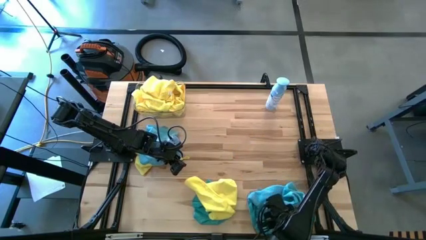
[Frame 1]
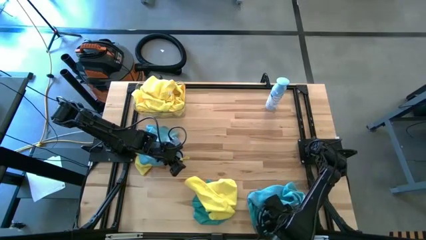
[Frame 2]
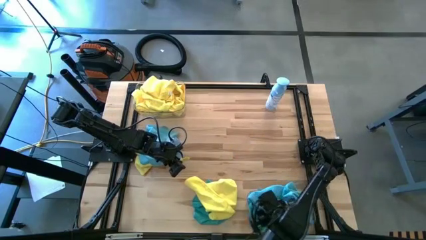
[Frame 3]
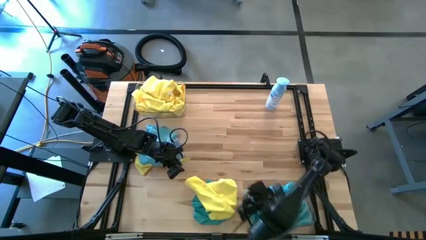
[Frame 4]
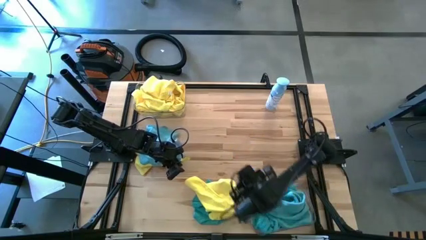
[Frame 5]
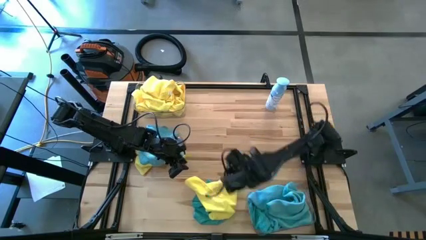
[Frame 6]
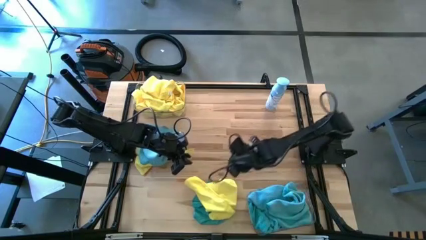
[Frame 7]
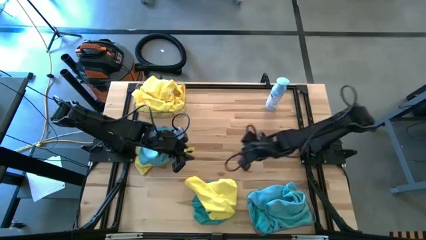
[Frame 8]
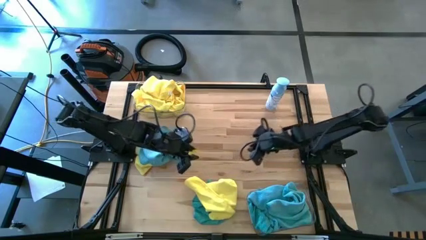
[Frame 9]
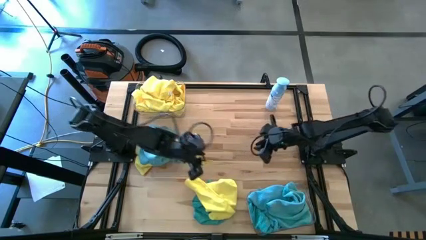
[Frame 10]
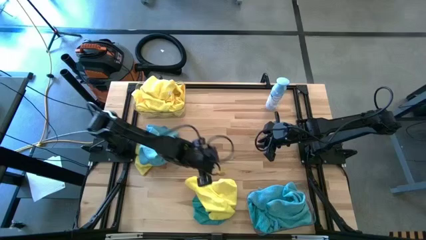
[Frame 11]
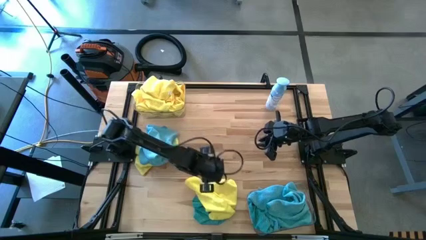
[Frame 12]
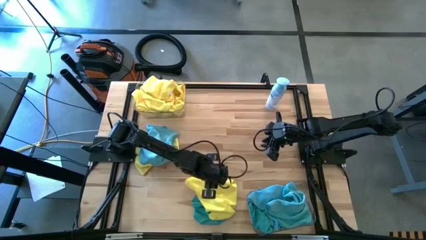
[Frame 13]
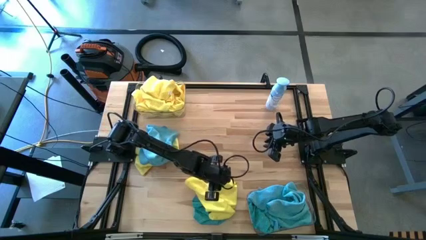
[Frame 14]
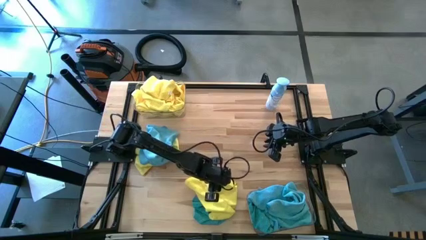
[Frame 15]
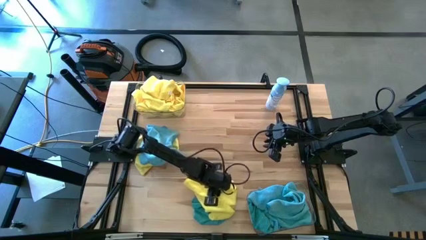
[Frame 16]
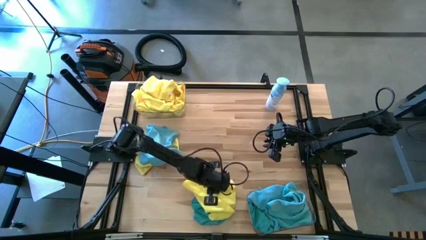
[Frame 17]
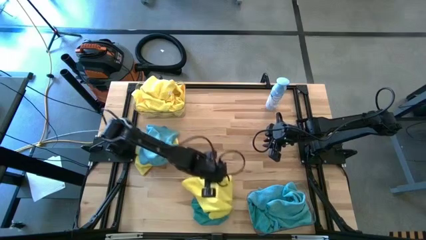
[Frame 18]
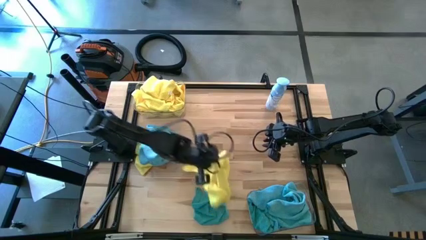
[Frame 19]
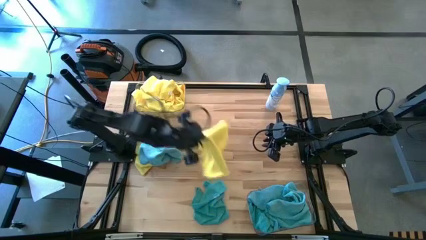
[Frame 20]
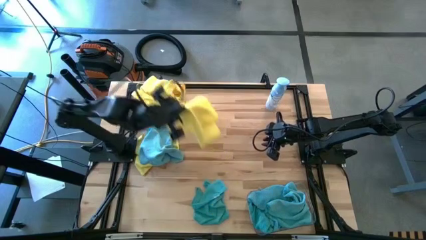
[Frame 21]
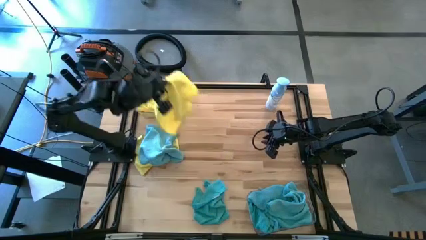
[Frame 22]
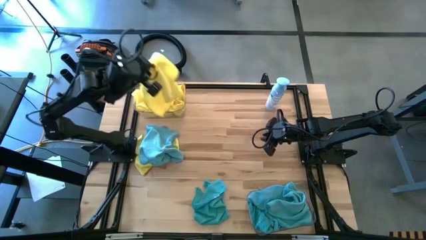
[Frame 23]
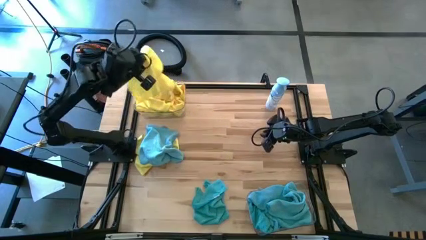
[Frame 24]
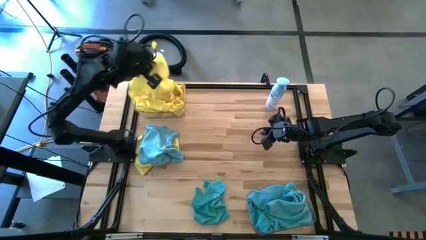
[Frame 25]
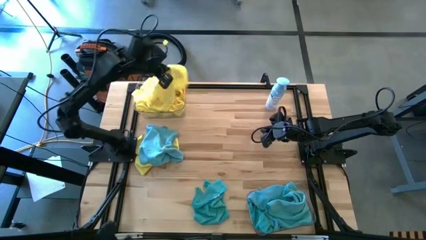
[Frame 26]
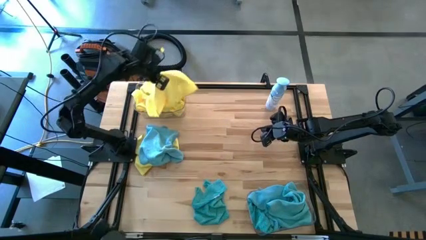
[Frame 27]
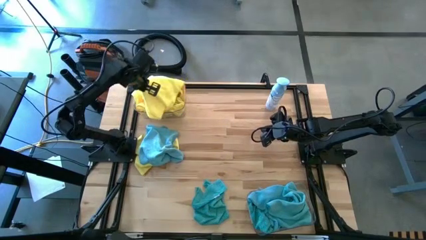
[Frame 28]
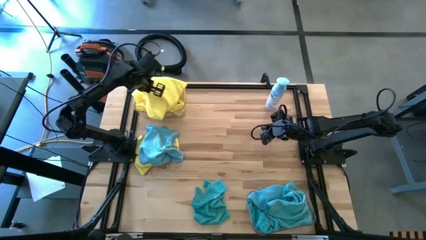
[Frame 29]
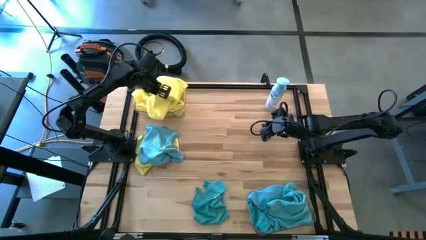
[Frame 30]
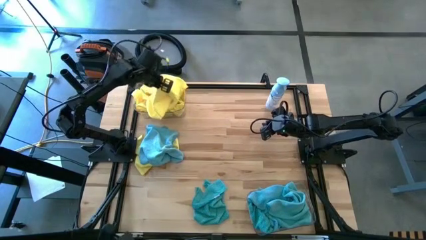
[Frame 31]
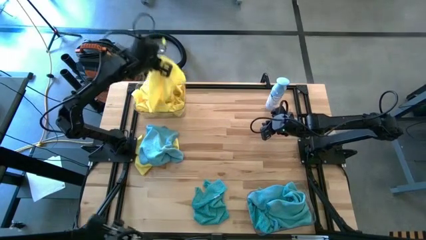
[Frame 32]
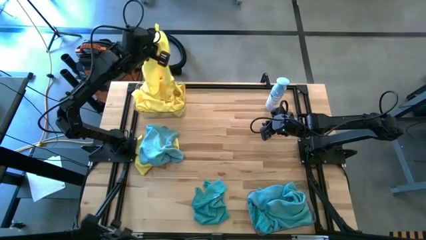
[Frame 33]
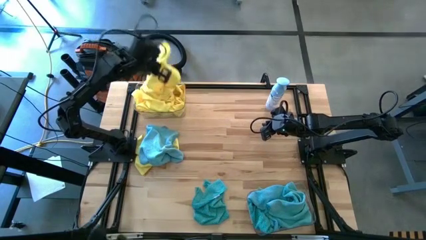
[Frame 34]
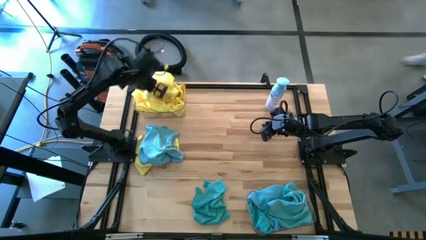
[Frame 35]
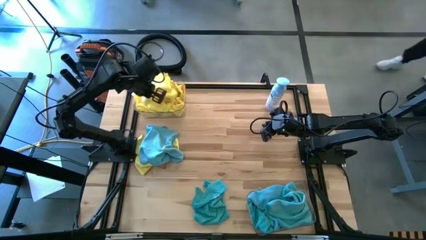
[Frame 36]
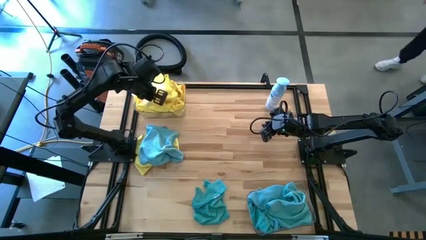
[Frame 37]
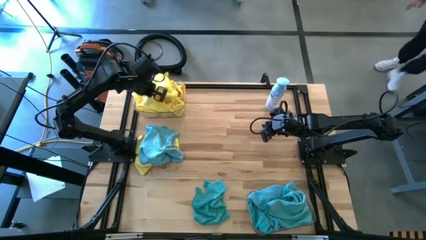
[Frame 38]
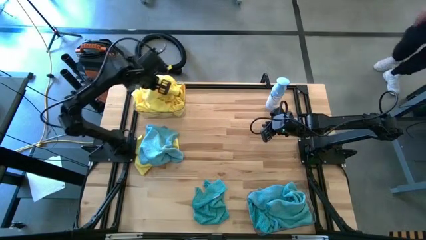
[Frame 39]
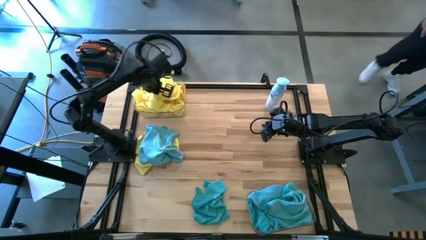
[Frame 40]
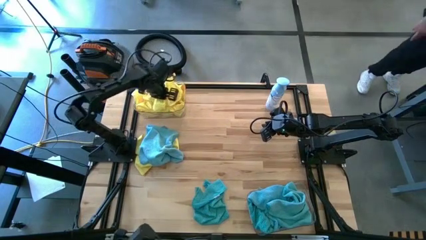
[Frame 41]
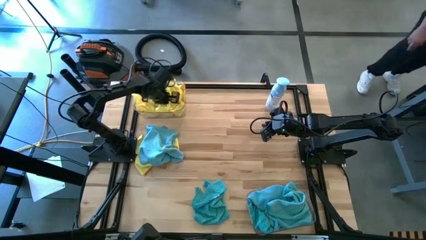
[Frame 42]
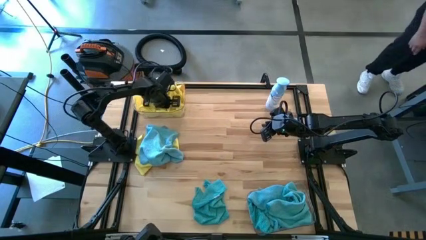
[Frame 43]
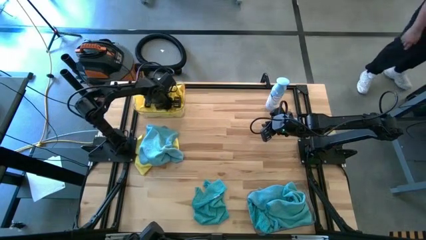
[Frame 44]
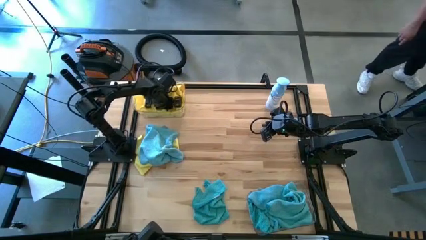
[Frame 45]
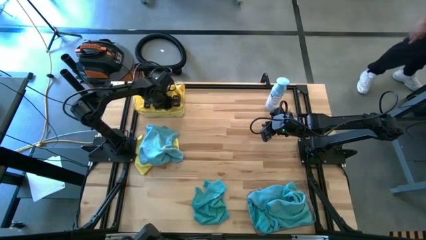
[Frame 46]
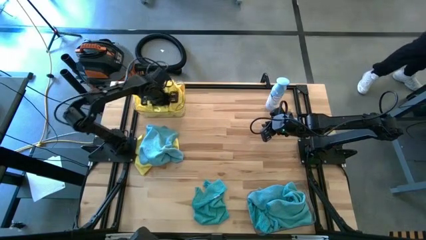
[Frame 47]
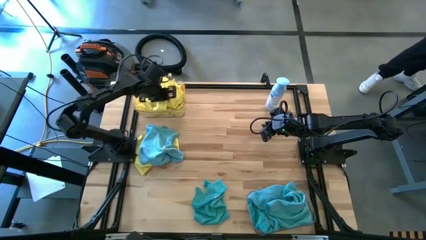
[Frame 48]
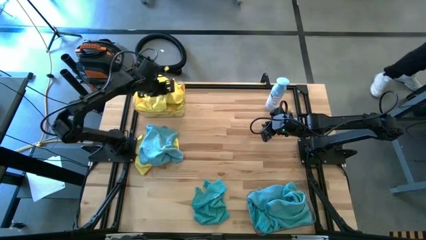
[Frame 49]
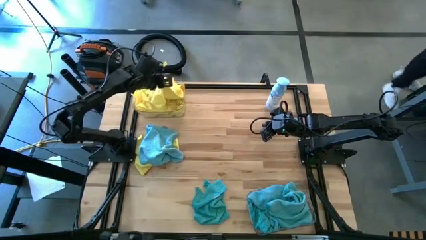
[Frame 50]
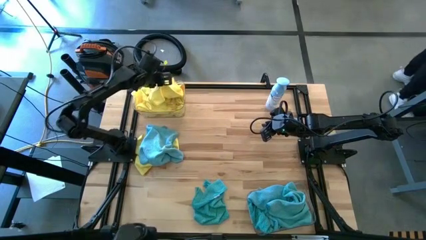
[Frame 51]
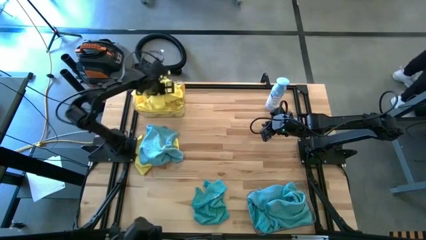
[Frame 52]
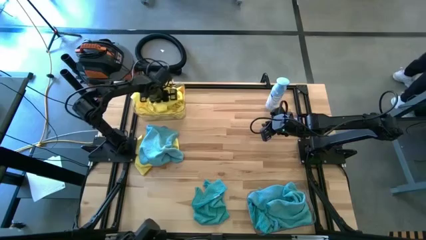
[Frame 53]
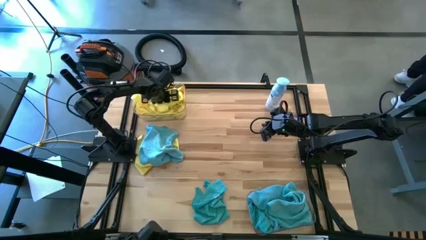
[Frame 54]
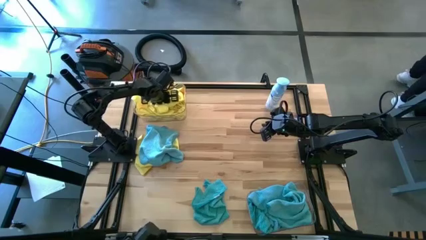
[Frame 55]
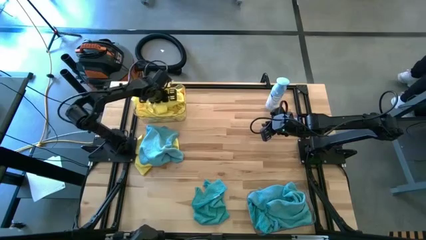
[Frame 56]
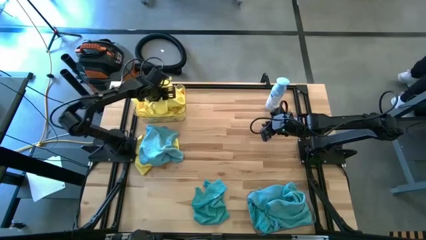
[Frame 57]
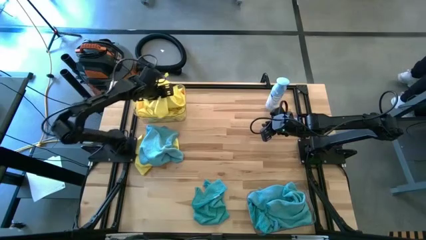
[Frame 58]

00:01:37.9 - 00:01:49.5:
Task: Sort microfiber towel by color & place in baskets
Put the yellow towel into the top transparent bin

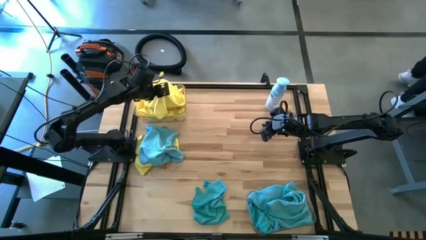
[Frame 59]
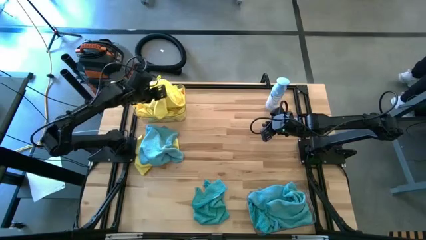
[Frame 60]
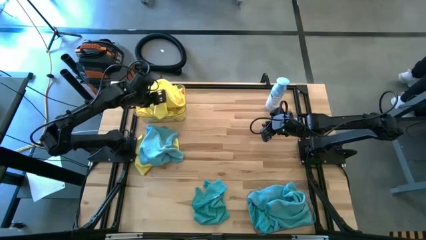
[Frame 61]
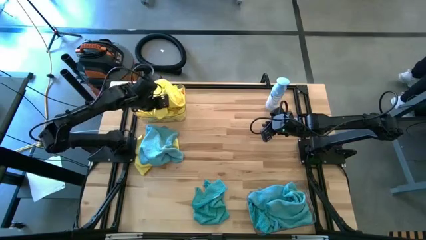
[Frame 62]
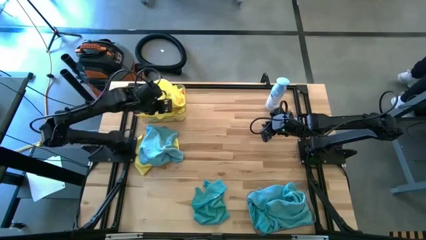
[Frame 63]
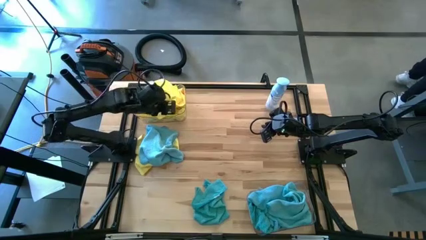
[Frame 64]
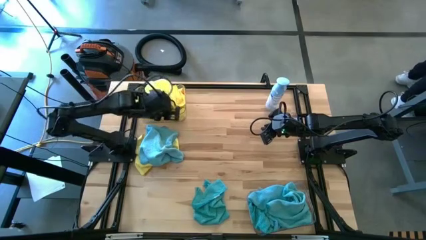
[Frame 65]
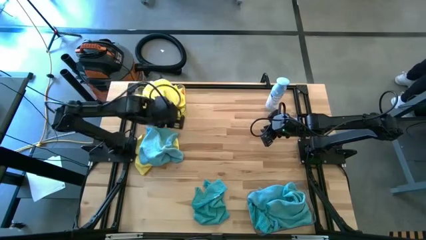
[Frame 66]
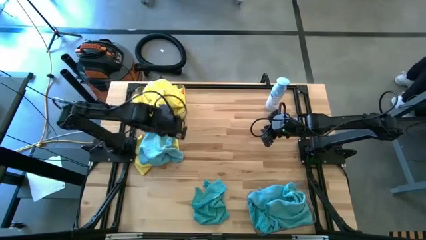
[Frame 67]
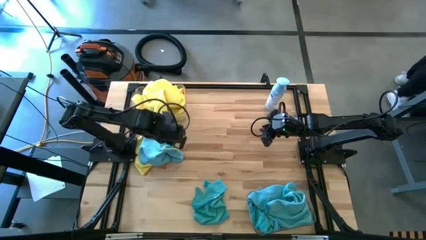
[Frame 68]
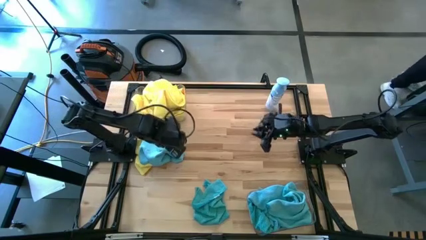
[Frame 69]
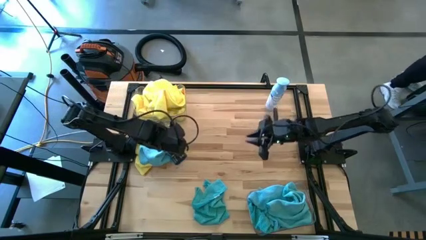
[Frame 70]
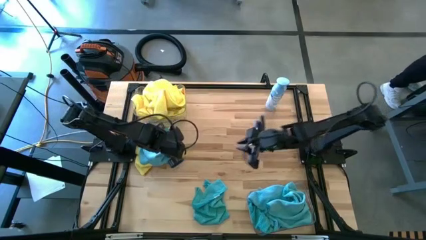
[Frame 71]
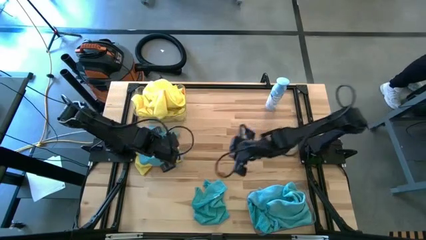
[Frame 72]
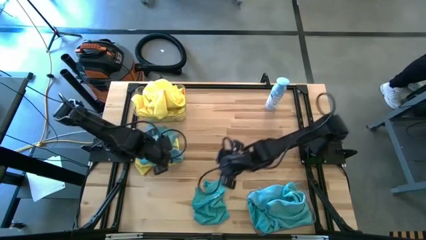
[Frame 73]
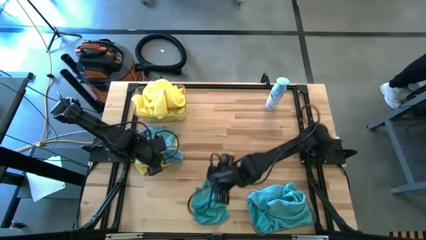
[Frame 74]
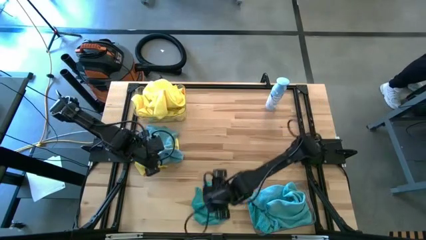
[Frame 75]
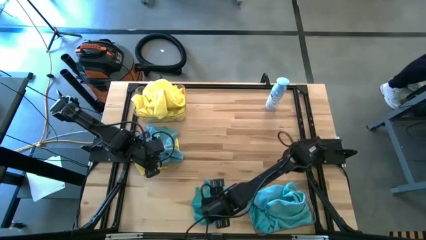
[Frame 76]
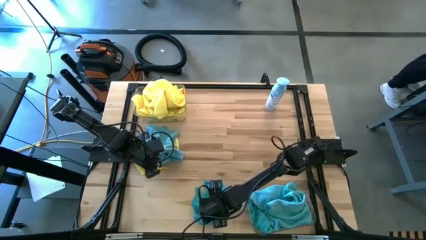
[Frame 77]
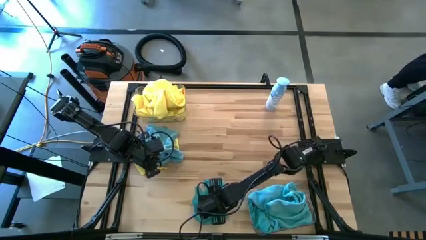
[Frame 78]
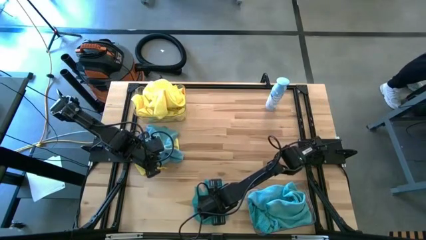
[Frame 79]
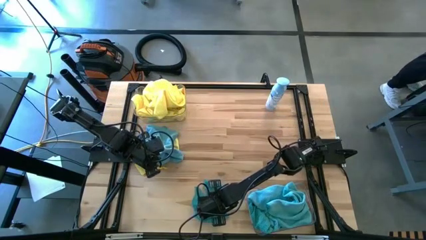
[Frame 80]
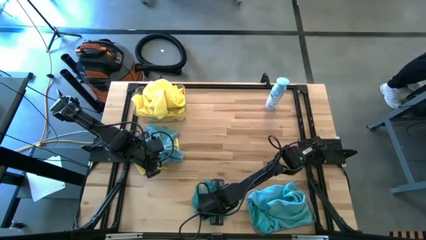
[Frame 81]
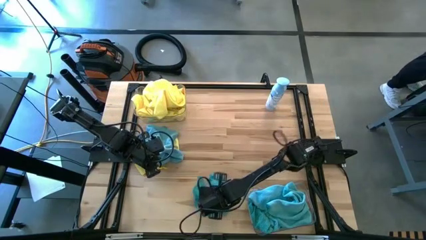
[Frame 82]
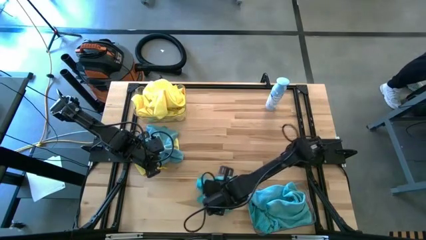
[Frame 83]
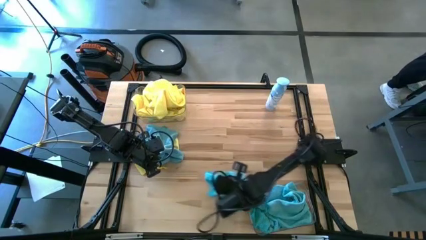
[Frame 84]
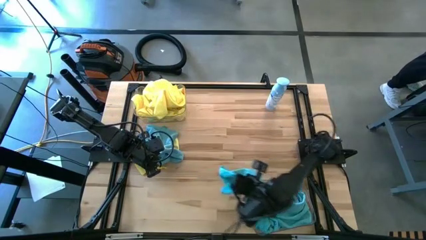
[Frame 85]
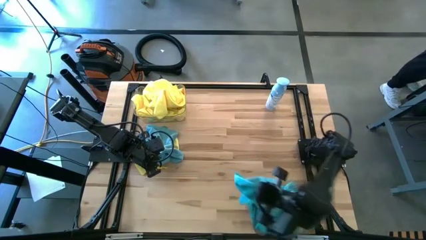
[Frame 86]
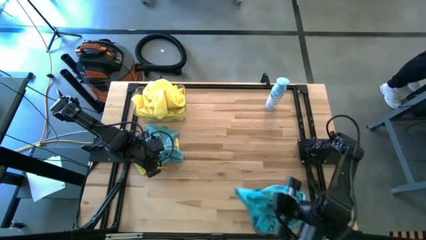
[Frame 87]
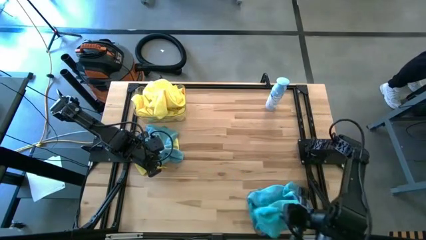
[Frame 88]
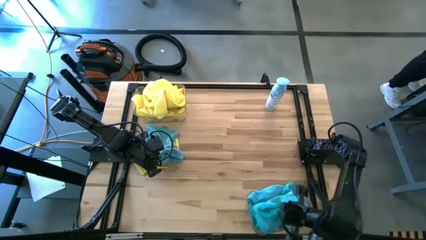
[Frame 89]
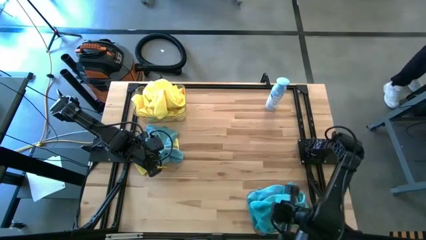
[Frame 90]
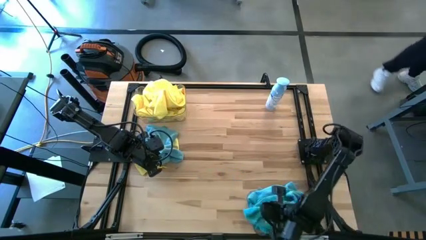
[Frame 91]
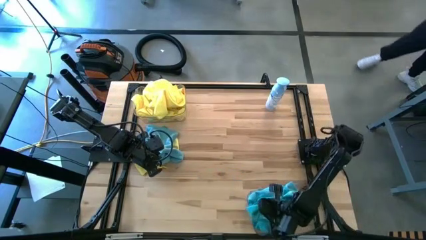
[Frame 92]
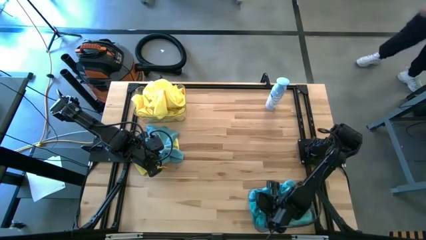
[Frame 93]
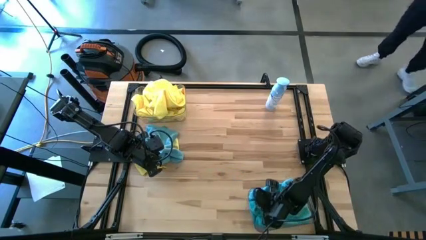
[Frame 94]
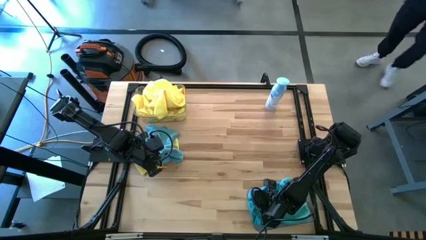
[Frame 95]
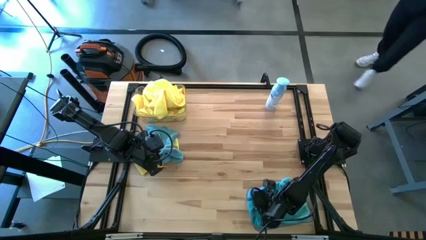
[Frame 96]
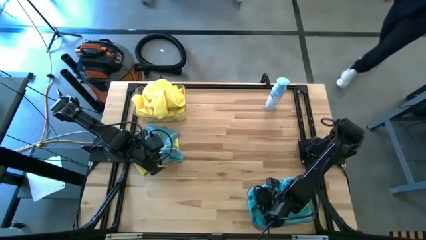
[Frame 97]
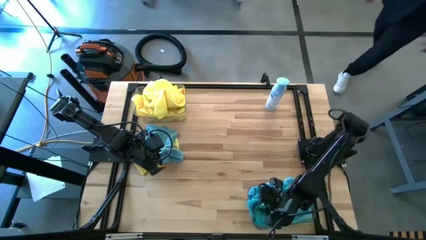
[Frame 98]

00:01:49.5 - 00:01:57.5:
Put the blue towel into the bottom transparent bin
